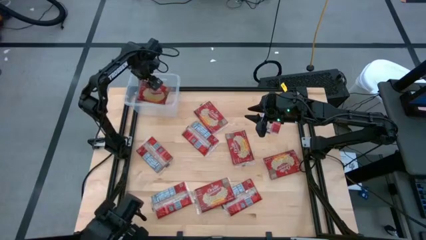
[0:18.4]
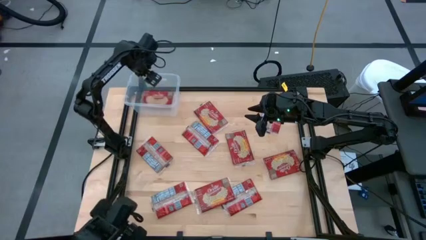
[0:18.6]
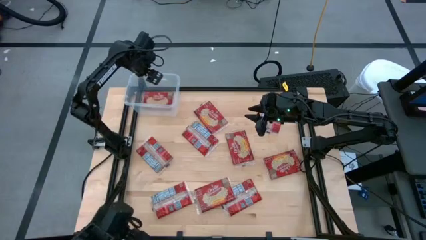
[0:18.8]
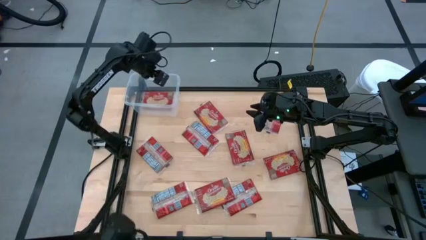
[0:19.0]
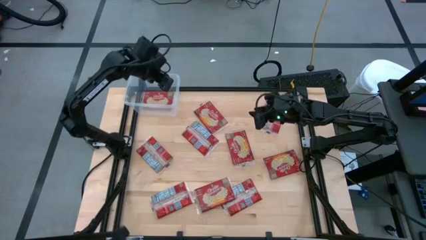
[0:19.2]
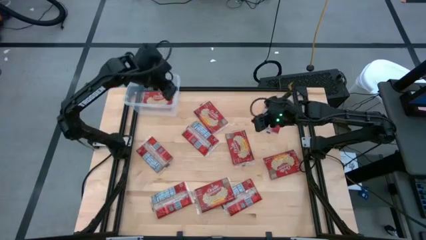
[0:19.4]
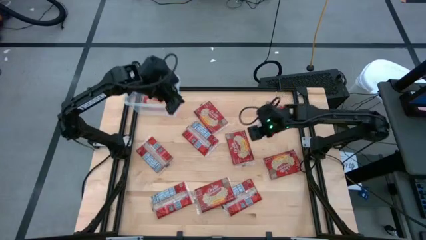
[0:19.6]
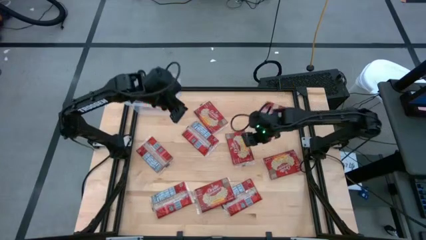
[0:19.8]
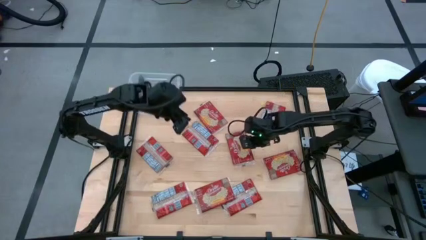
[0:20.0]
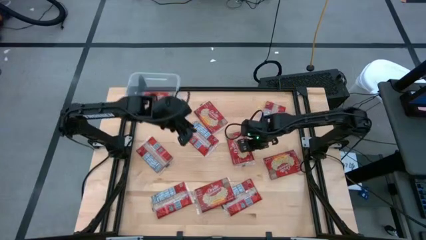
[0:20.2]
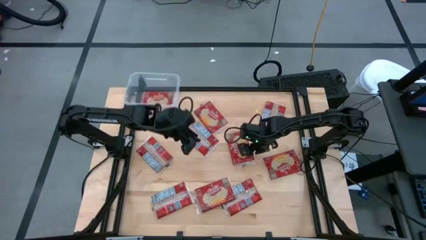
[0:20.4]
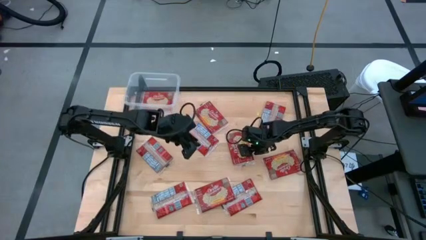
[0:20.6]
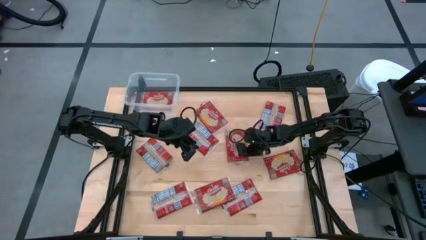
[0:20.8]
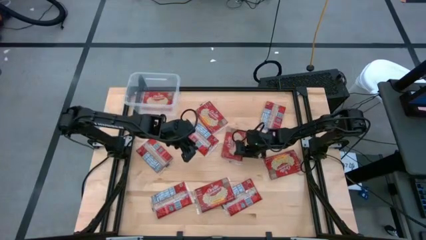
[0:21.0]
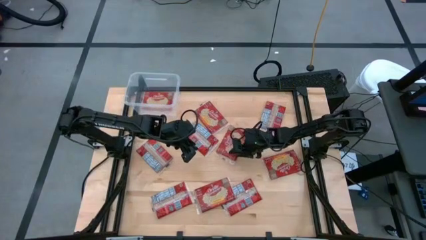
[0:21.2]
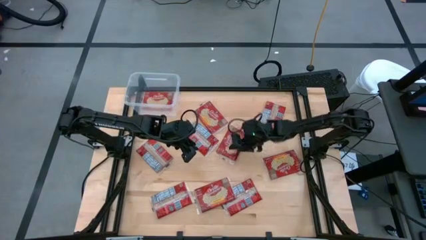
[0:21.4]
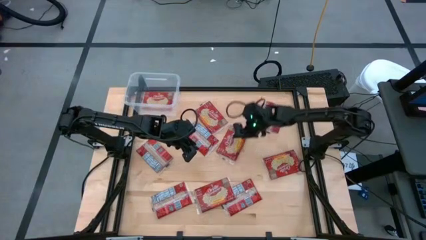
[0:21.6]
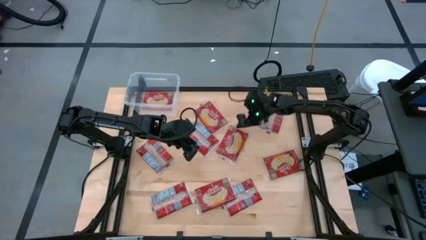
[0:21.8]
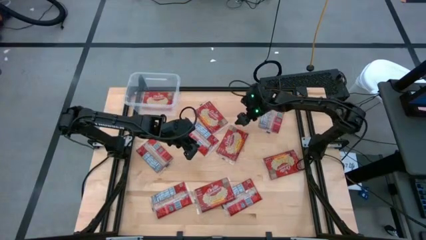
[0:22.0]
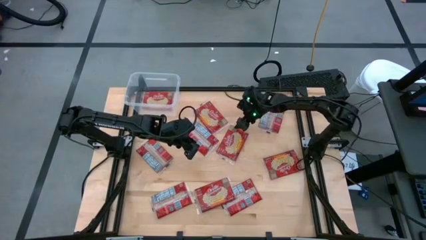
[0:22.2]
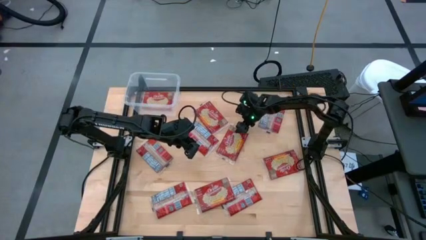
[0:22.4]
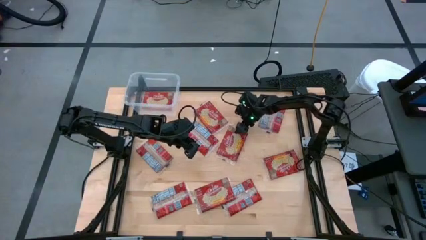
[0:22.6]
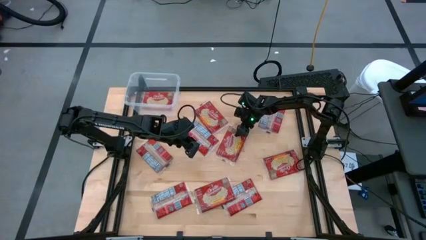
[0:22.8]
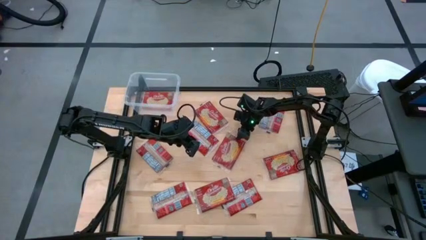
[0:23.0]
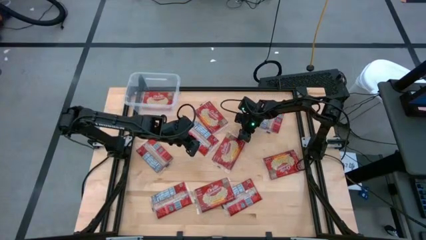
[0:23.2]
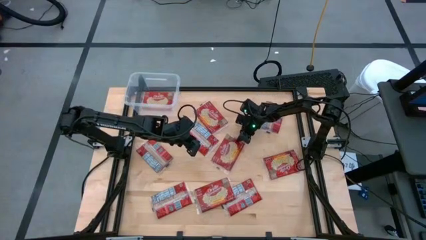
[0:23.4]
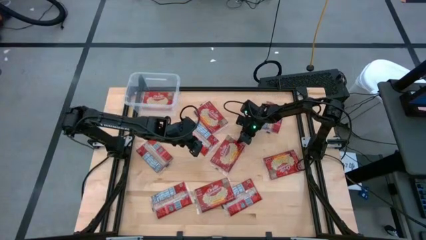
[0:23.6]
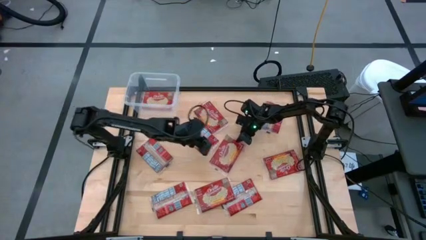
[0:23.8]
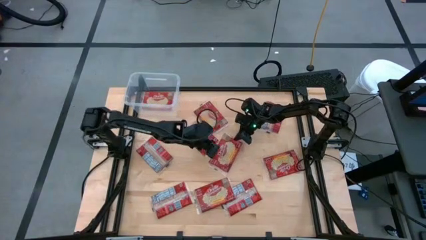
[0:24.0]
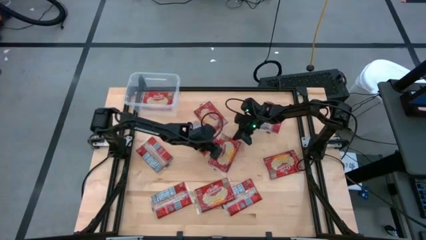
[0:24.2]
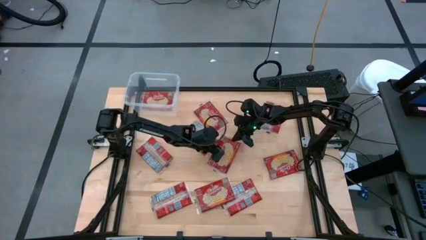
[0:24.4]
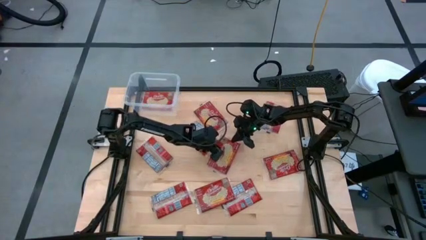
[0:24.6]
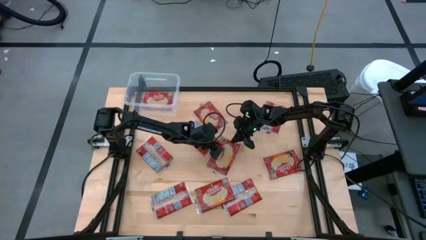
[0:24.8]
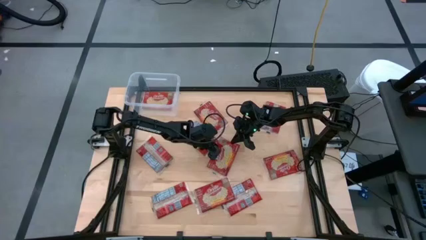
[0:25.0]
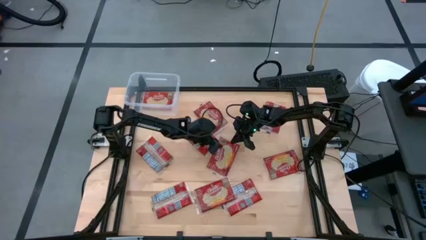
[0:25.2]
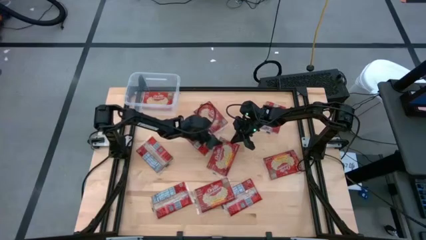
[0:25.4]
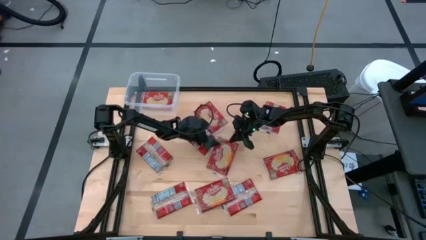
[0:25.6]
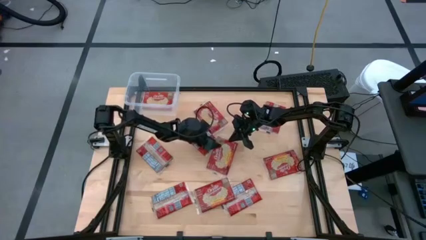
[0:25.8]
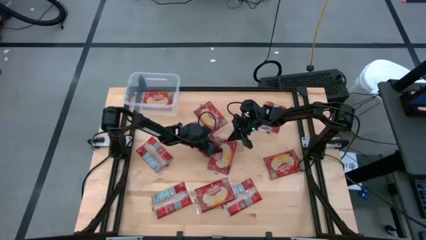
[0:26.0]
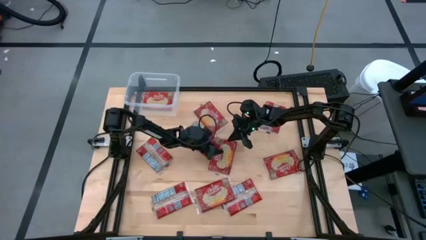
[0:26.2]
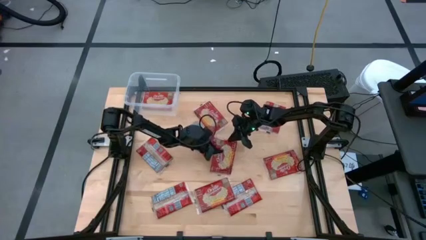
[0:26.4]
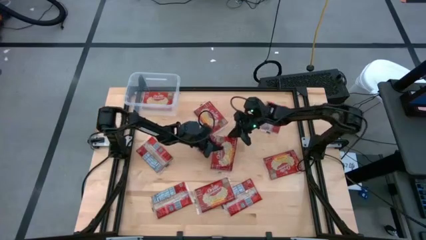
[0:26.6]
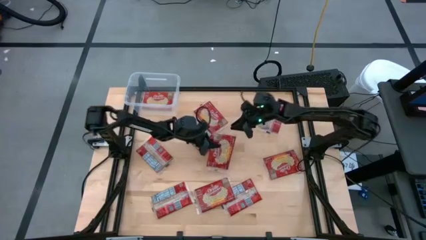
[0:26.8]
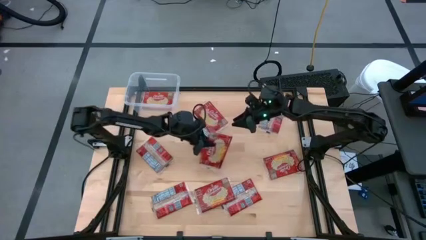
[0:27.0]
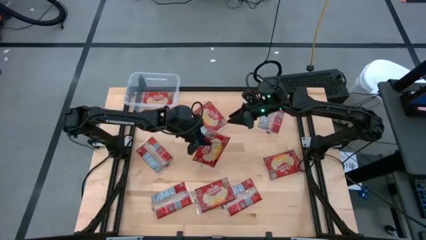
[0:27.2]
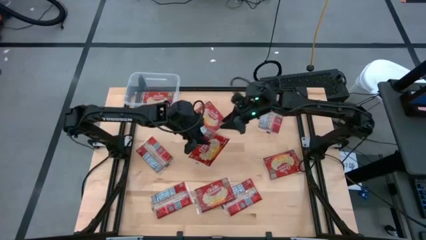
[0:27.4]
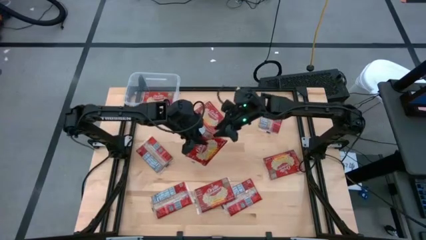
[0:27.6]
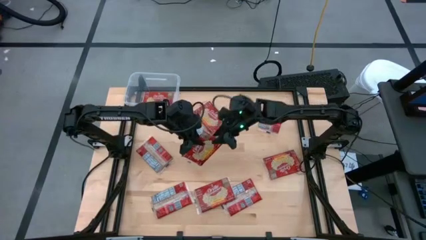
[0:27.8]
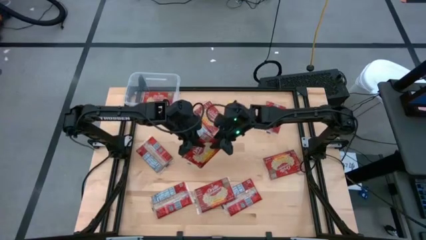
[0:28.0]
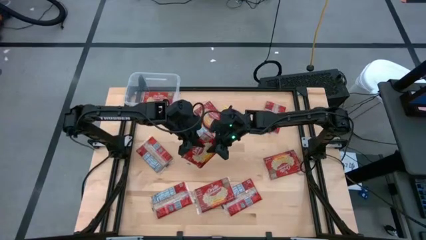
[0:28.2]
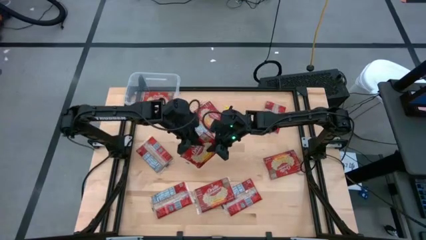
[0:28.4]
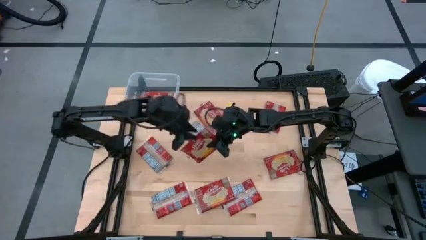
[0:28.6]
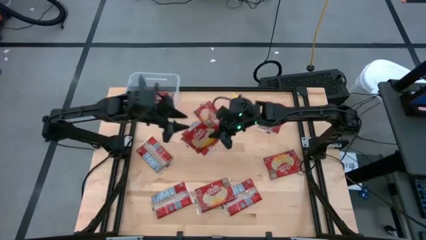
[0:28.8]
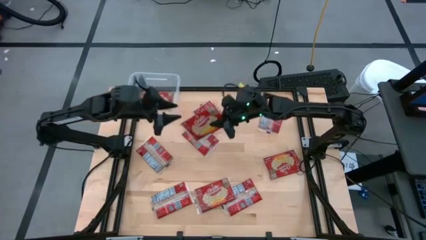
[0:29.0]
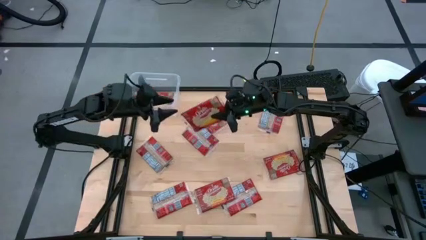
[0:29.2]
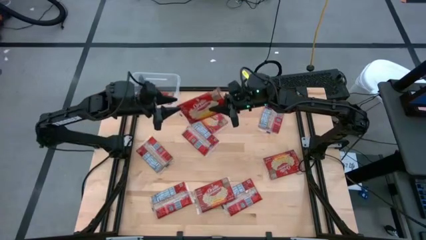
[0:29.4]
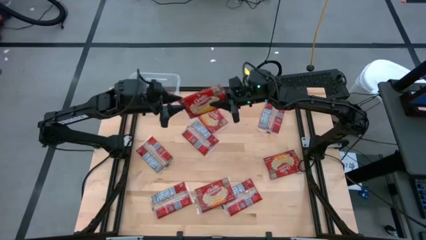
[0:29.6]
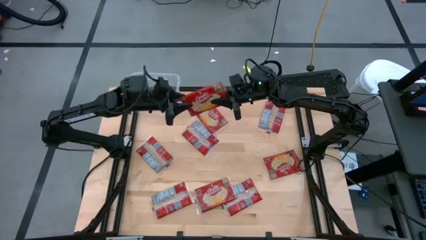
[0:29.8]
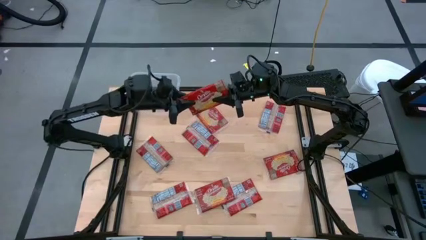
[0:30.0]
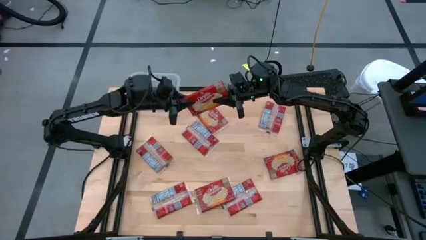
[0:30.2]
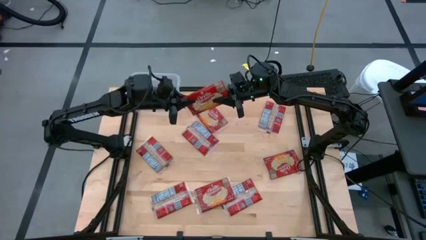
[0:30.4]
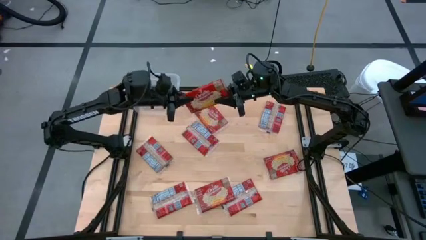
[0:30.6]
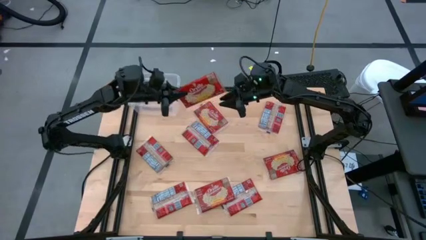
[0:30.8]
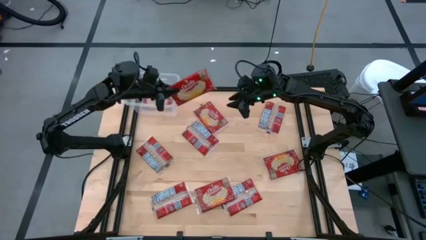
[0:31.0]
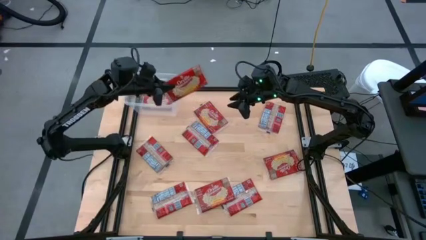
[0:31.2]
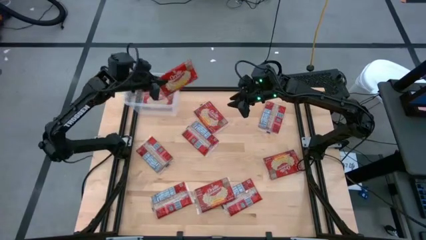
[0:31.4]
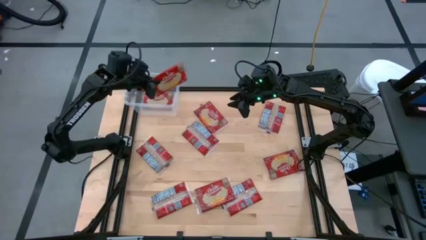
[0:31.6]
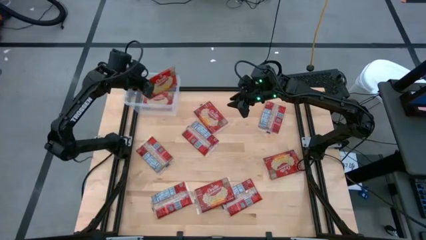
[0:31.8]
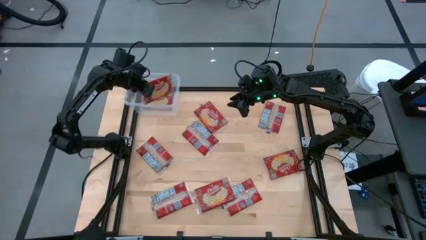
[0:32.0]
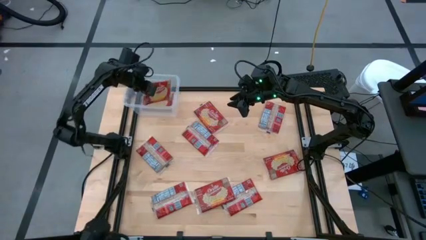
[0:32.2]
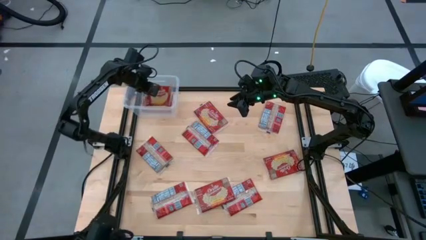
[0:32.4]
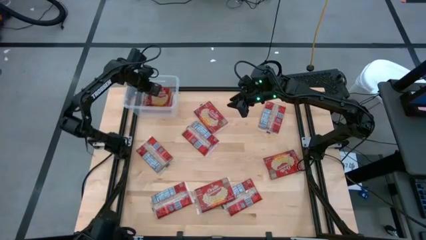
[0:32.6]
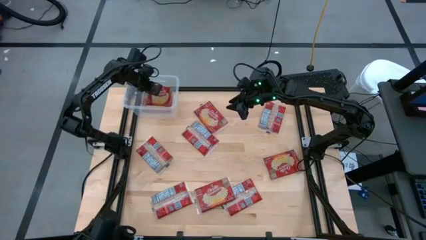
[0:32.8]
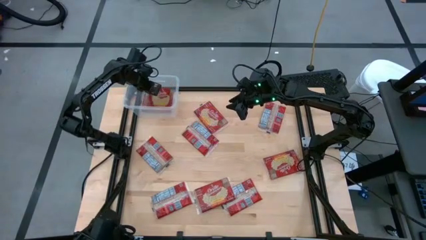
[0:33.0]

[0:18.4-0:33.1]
Task: Sort popcorn bags into baskets
Put the popcorn pack into the transparent bin
